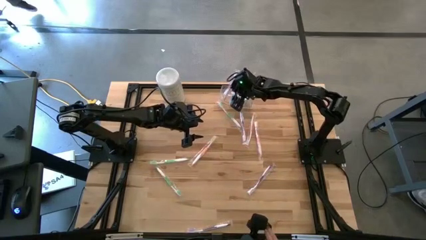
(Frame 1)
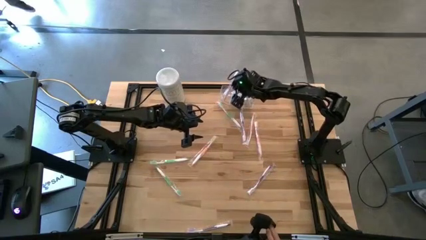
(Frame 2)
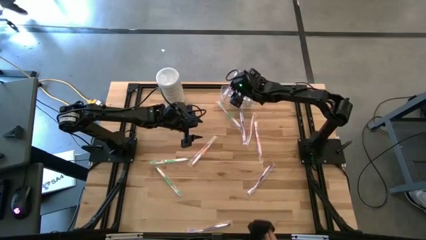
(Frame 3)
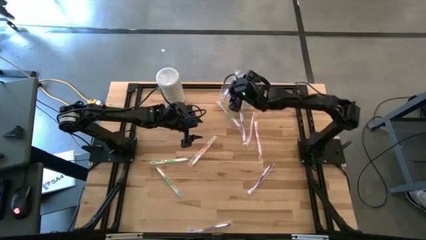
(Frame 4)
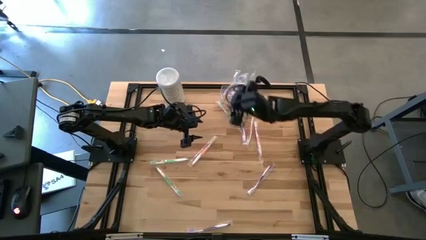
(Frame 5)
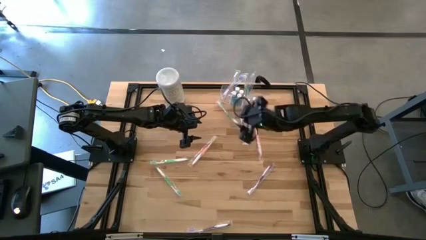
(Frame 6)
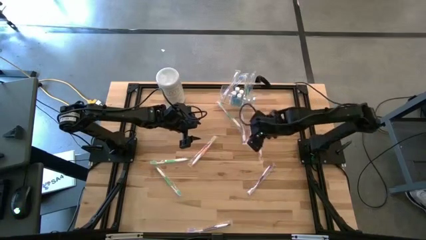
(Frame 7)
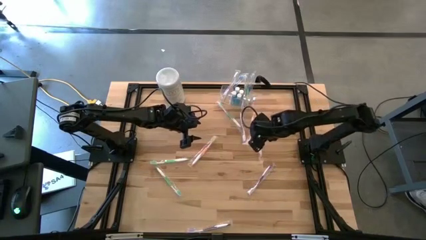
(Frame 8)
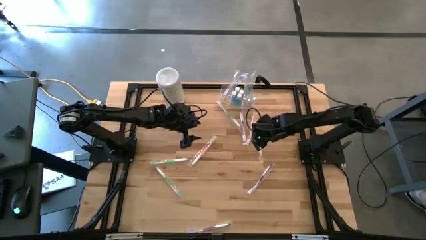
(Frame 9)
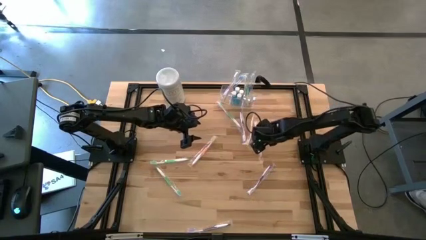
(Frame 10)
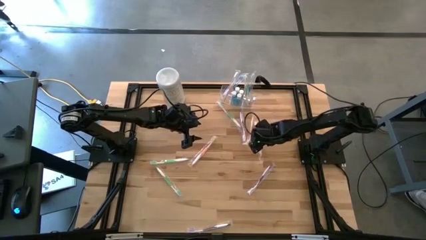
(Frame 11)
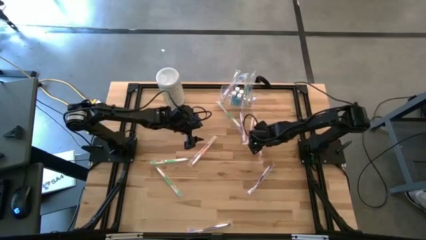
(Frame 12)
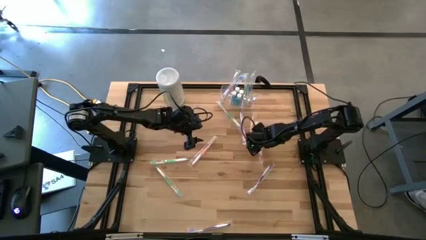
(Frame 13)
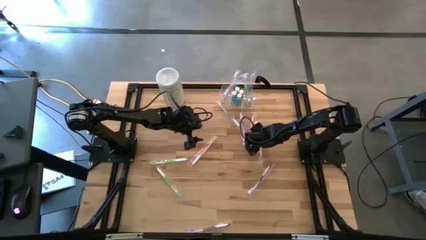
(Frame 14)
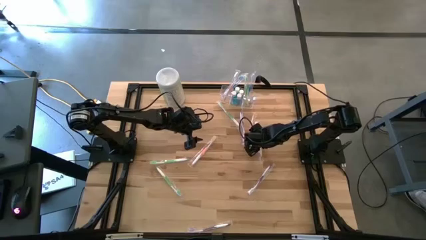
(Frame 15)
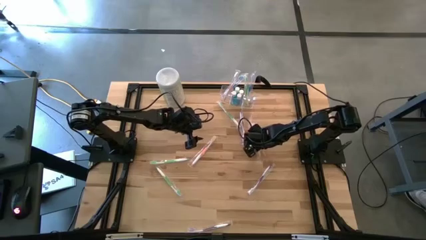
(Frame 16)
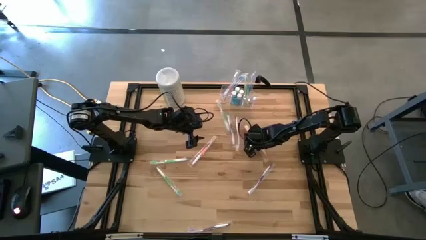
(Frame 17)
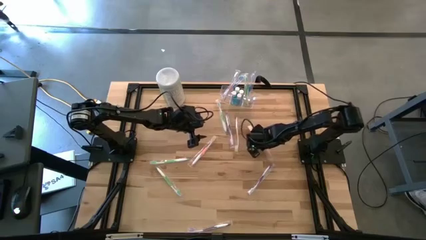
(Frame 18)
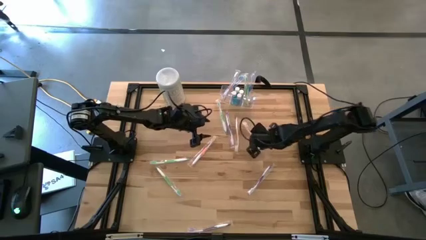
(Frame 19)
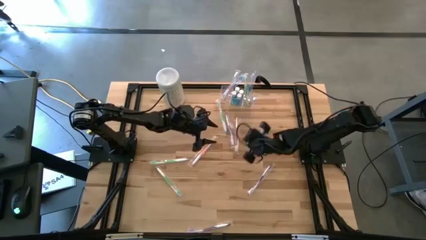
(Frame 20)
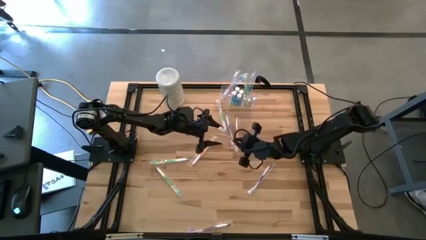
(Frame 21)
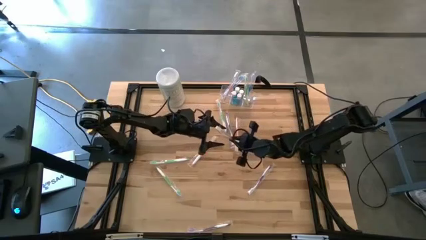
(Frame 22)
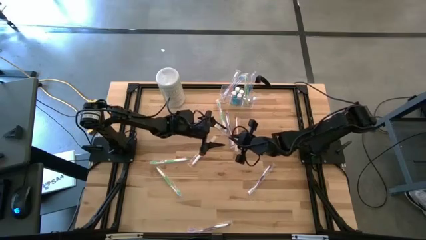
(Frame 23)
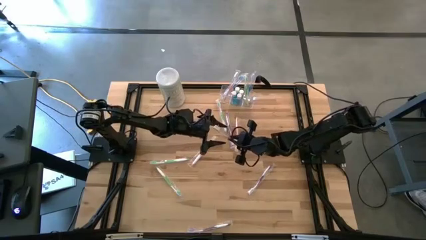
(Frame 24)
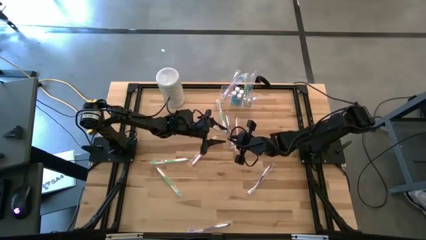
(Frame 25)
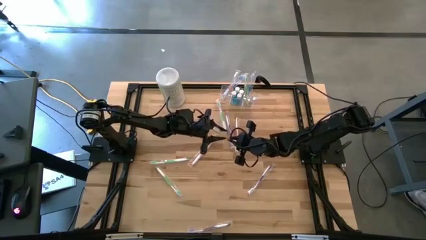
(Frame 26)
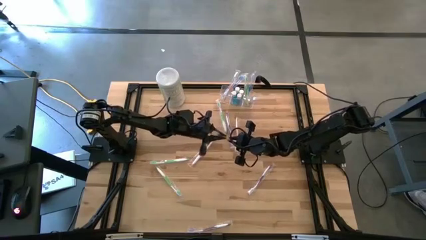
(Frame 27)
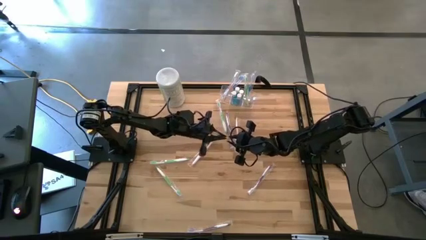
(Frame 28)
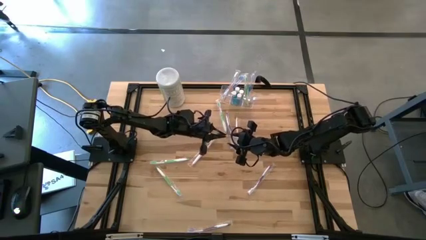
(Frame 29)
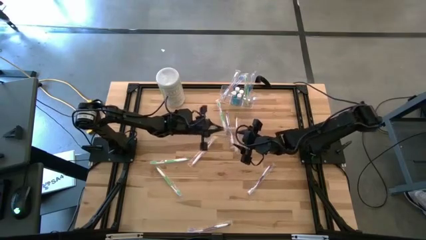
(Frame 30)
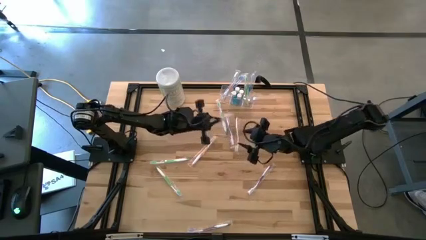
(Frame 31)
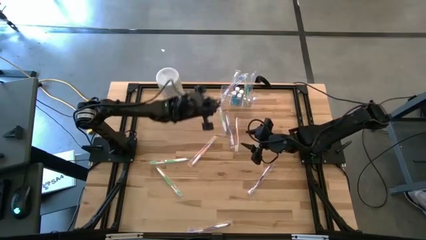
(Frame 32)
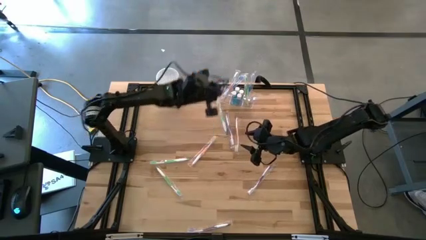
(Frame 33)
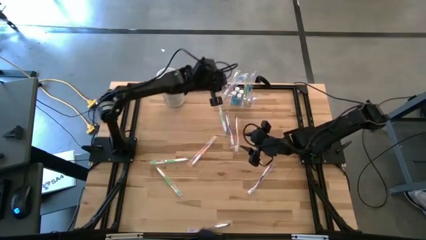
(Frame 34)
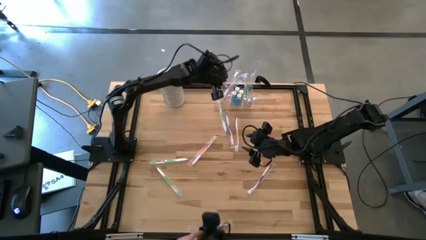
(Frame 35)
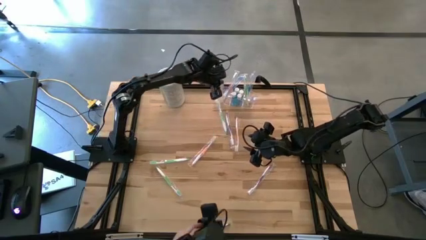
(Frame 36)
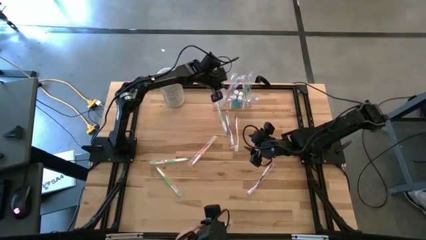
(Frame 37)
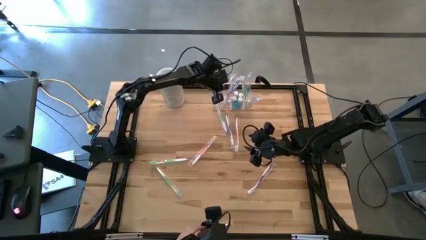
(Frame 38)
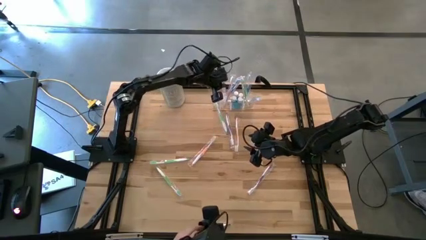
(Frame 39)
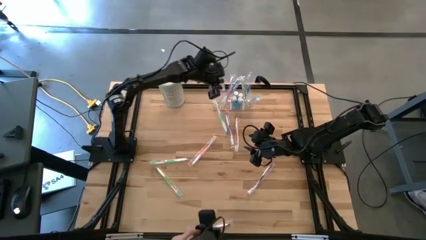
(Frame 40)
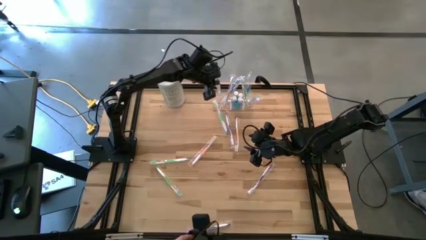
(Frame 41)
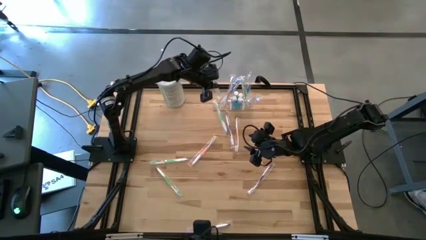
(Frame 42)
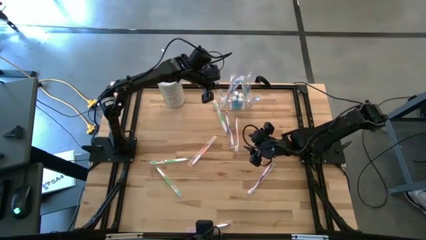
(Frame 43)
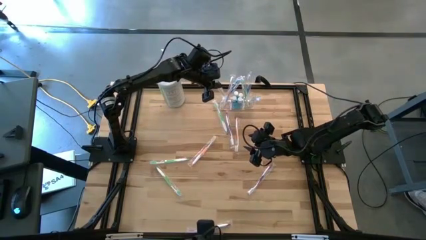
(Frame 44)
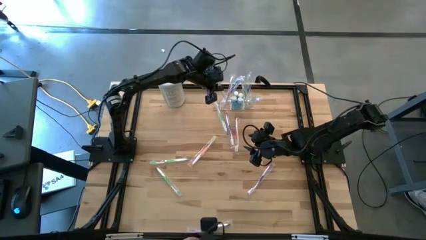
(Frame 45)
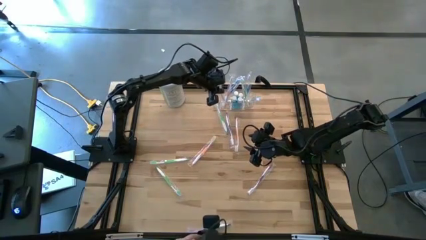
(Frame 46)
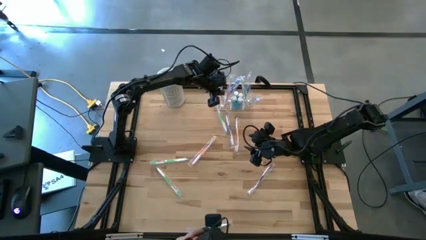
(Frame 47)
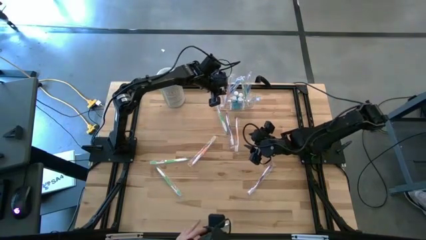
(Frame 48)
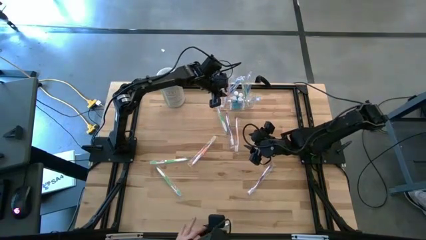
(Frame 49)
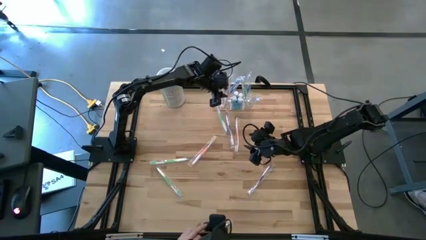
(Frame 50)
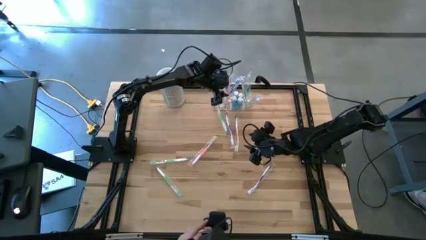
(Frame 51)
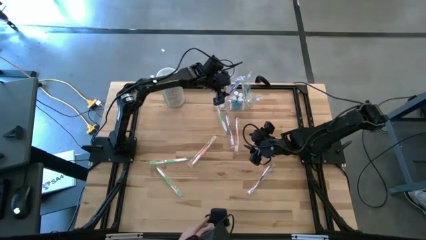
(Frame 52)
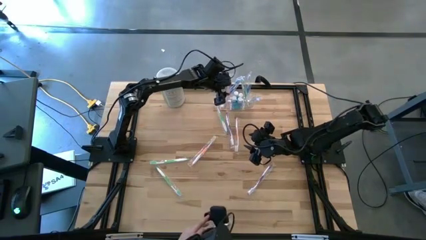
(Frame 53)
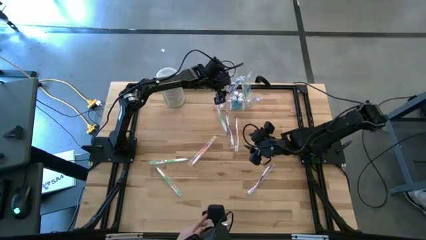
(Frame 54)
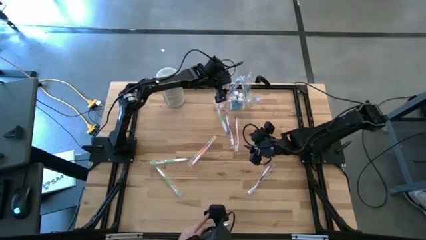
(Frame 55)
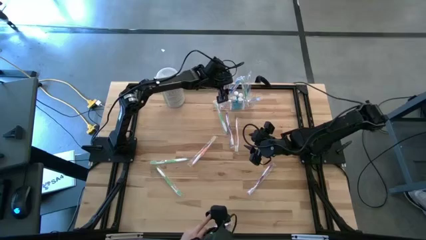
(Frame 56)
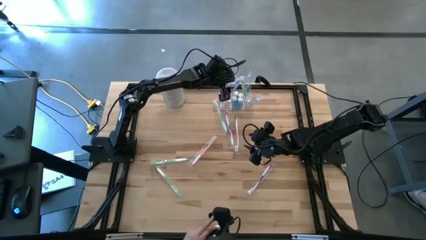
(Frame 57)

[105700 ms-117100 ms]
Task: Pick & Place toothbrushing station
Put the orange toothbrush into the transparent organizer

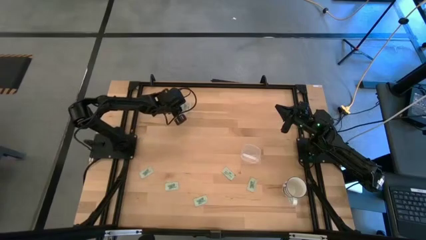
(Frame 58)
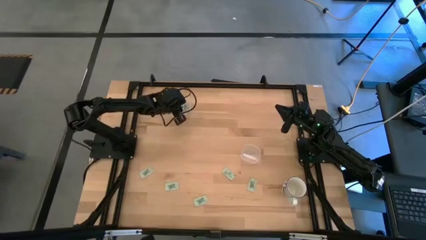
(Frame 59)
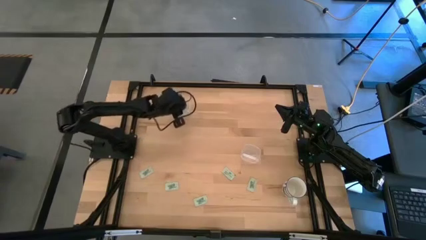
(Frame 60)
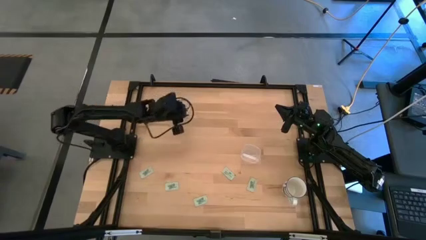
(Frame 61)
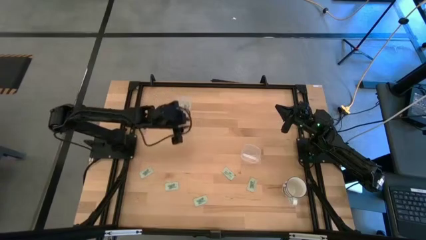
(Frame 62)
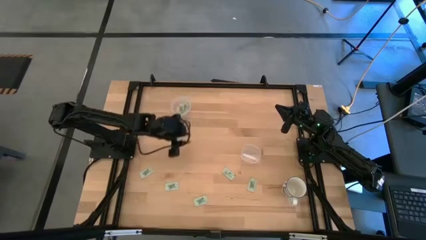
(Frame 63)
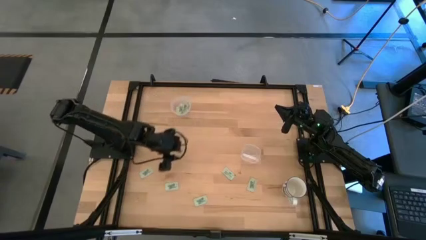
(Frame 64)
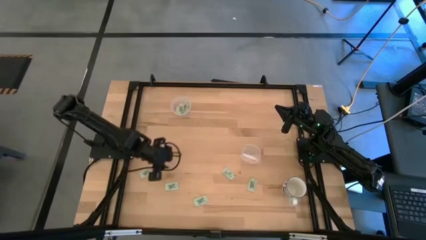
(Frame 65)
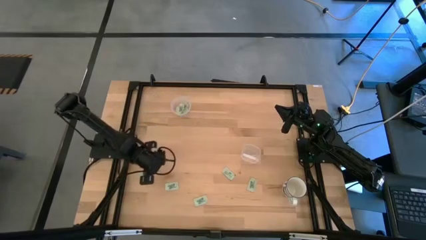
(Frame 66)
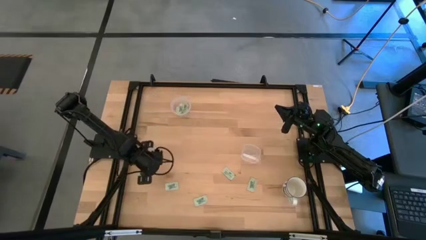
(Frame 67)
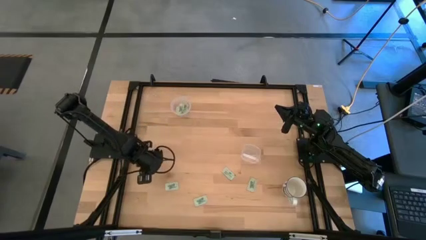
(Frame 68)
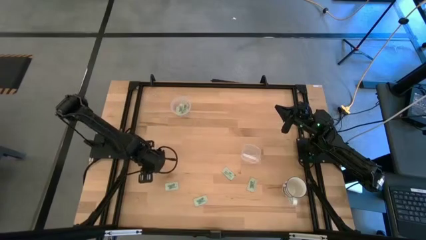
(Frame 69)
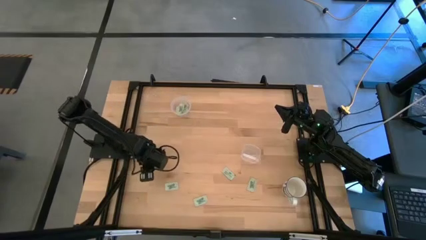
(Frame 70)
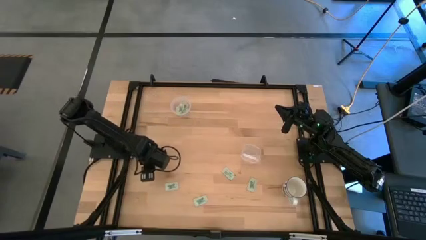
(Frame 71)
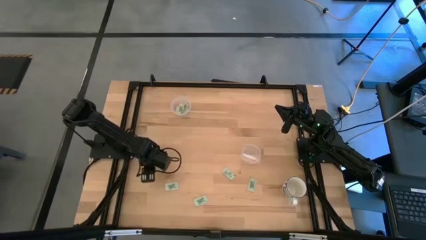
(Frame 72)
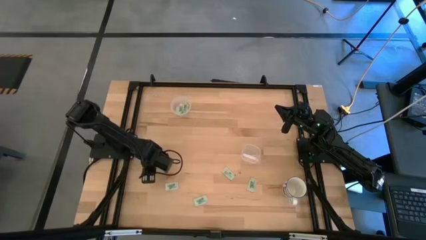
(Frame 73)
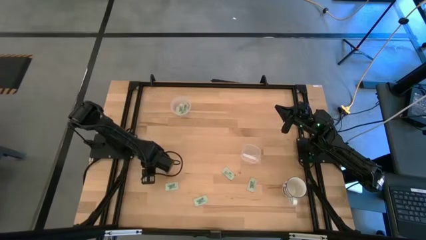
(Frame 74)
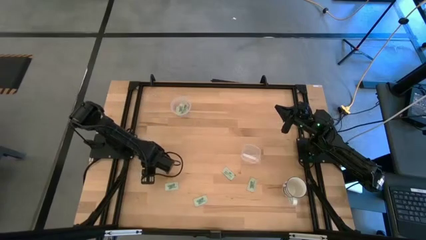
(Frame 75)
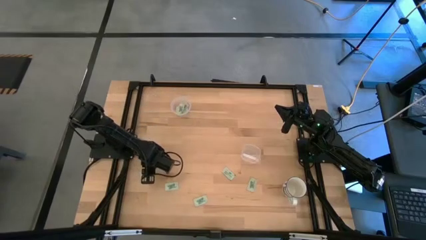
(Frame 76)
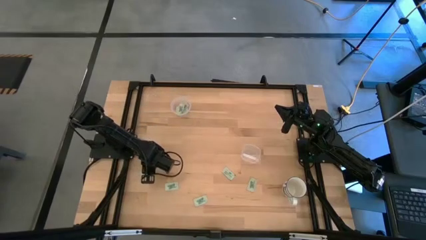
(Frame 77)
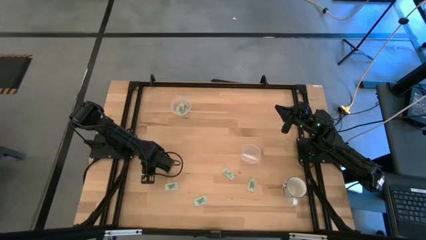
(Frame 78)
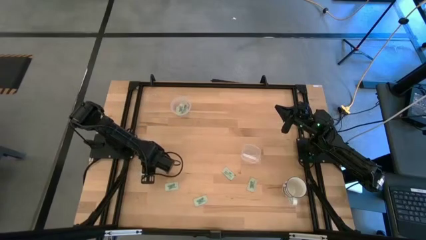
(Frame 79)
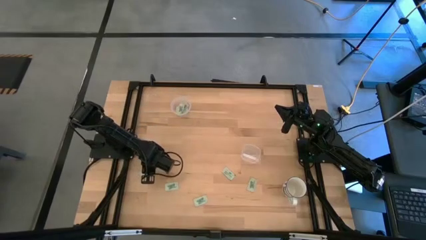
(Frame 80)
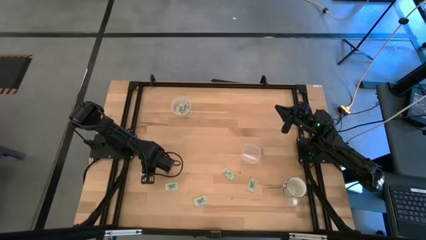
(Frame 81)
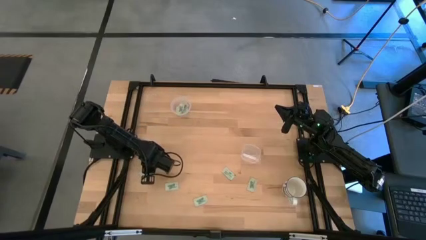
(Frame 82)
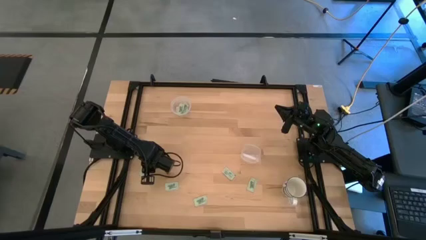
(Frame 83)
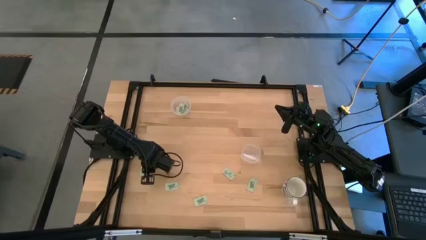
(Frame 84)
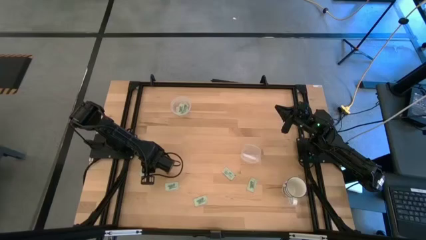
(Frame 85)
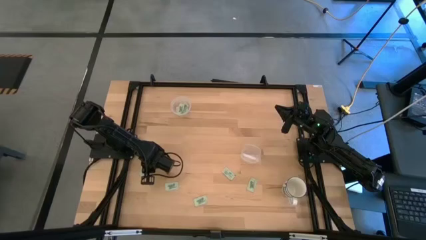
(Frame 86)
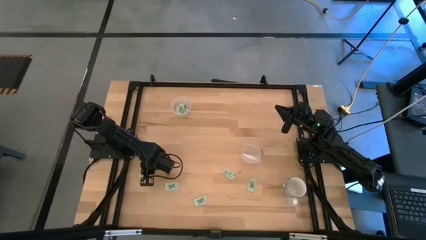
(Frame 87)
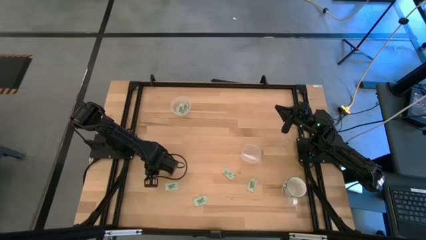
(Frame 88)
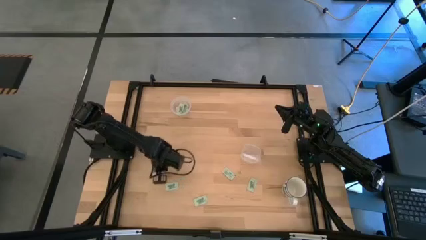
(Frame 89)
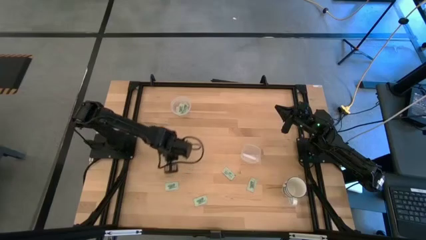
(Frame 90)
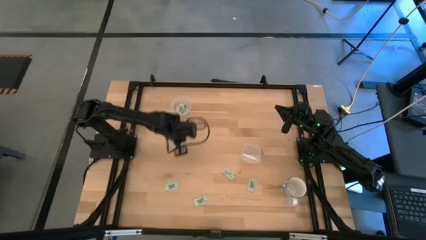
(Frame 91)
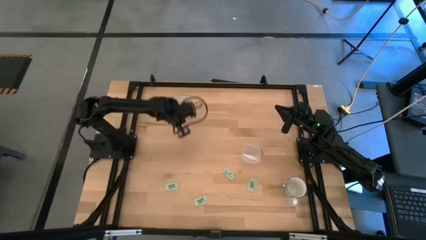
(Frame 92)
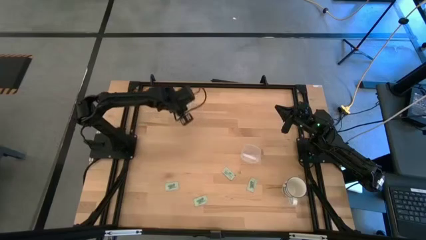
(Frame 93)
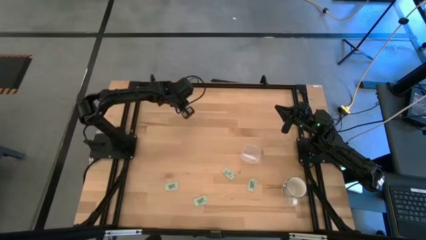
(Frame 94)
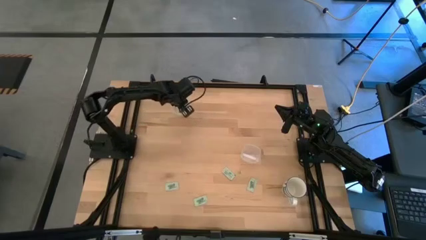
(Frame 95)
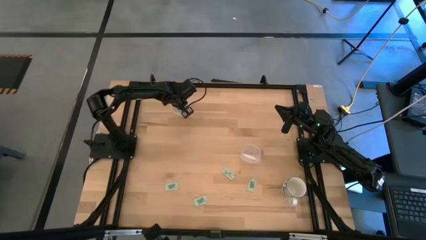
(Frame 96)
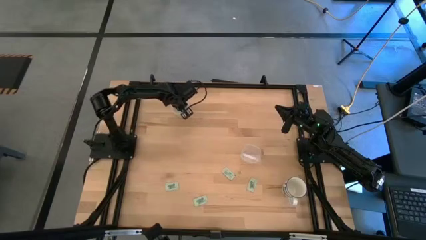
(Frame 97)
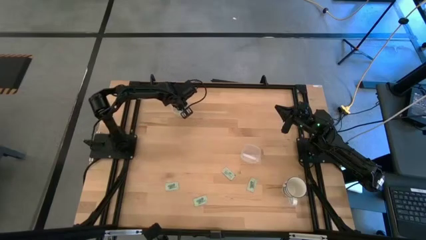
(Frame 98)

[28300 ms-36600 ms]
Task: Pick and place Stevia / Truvia into bins
Put the stevia packet into the top transparent container
